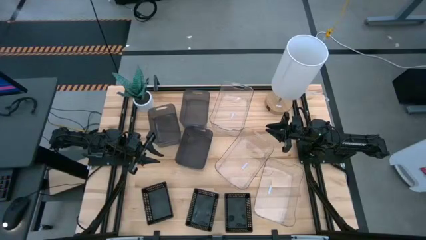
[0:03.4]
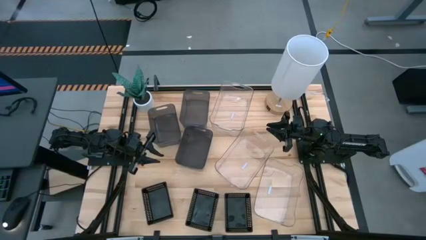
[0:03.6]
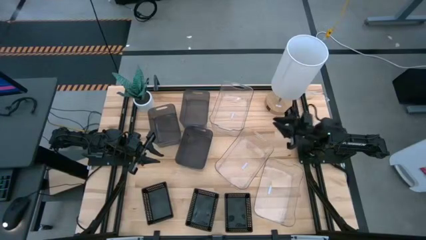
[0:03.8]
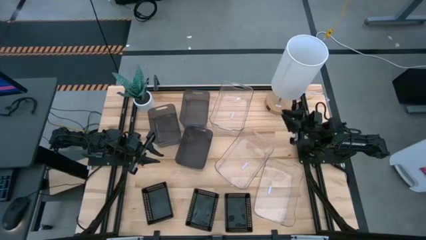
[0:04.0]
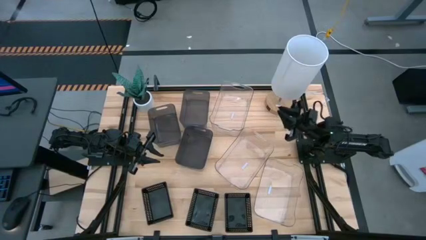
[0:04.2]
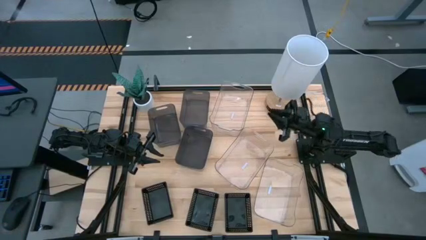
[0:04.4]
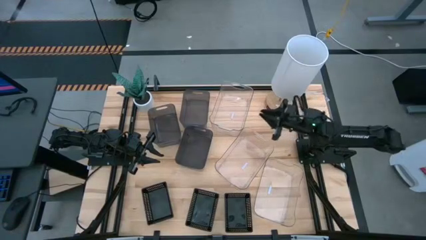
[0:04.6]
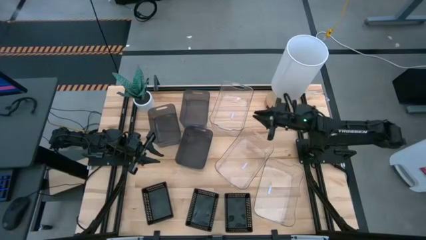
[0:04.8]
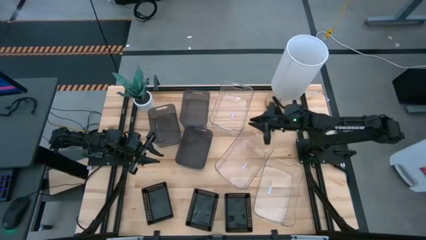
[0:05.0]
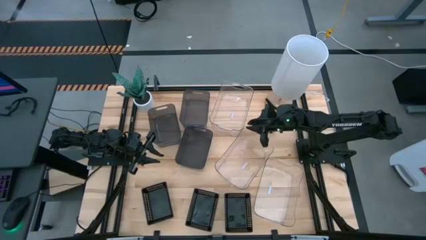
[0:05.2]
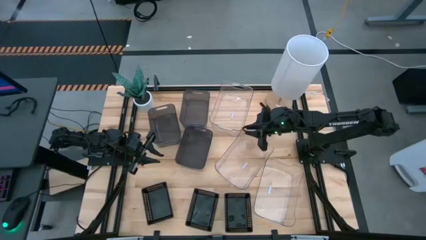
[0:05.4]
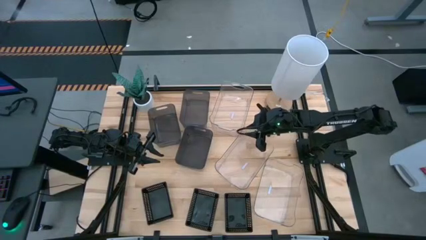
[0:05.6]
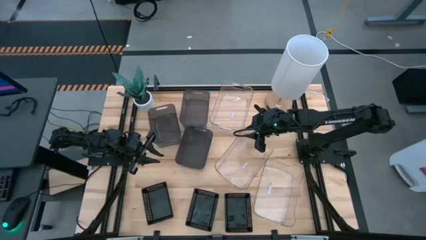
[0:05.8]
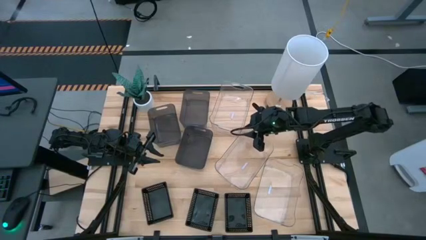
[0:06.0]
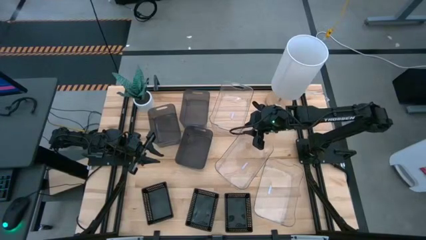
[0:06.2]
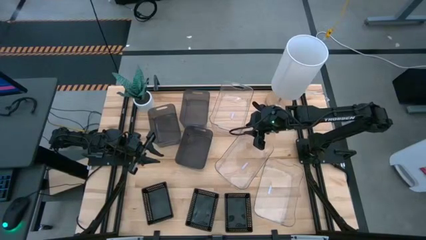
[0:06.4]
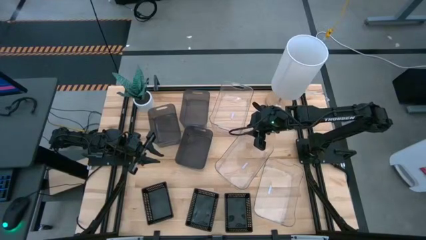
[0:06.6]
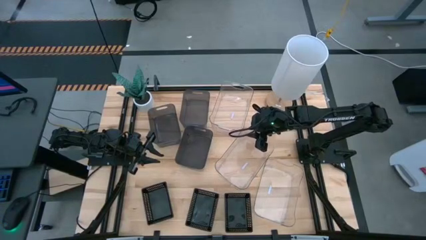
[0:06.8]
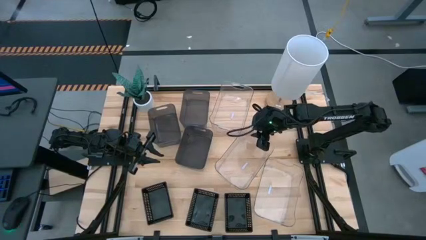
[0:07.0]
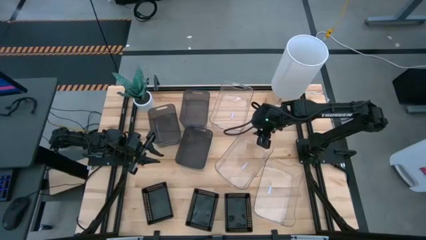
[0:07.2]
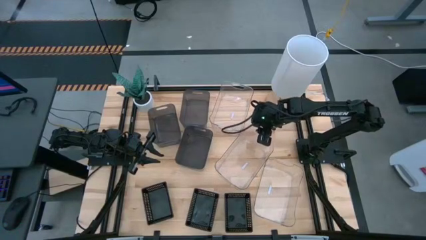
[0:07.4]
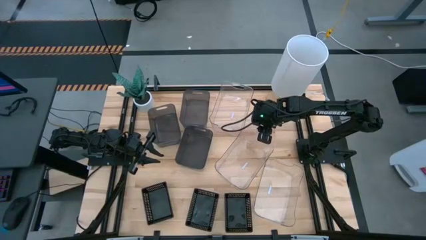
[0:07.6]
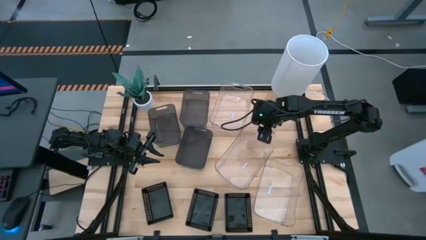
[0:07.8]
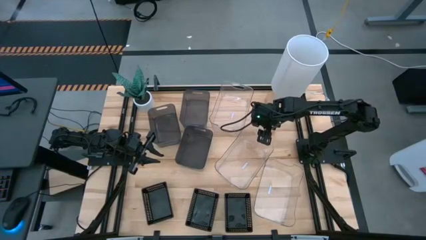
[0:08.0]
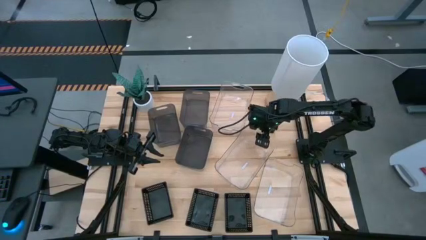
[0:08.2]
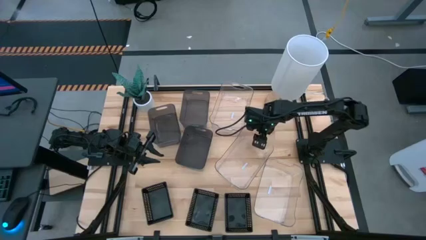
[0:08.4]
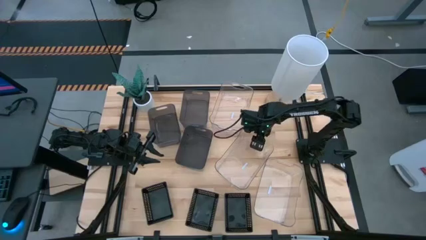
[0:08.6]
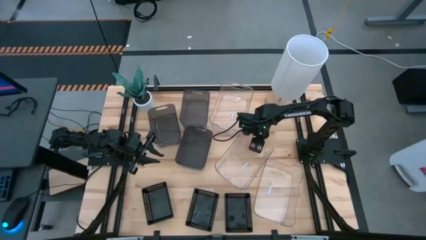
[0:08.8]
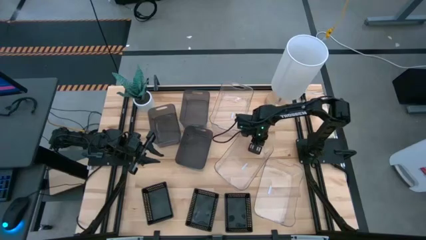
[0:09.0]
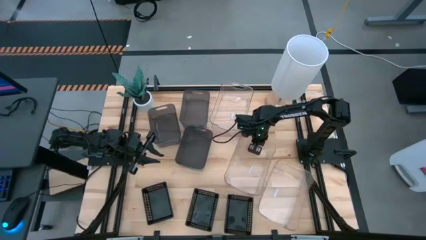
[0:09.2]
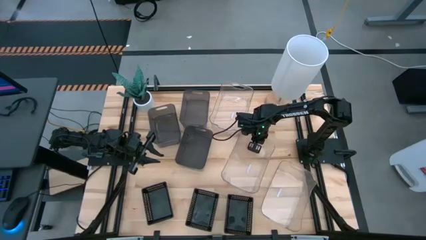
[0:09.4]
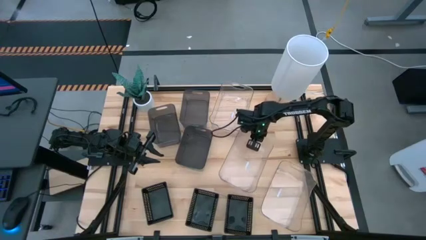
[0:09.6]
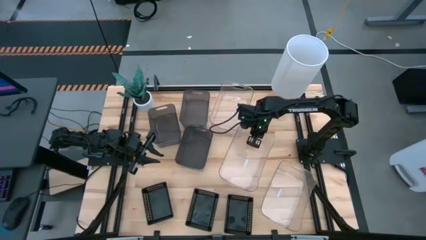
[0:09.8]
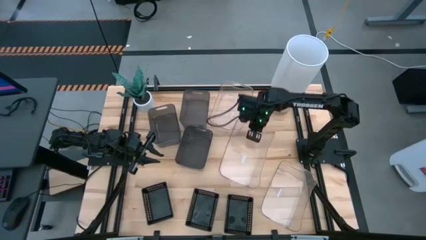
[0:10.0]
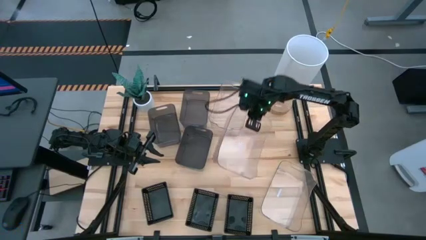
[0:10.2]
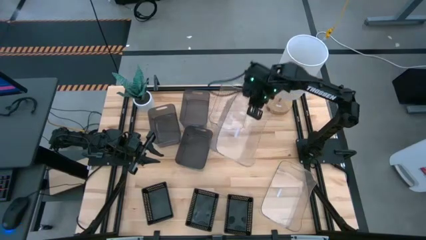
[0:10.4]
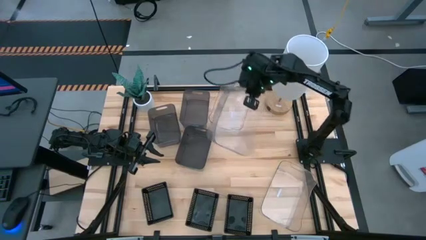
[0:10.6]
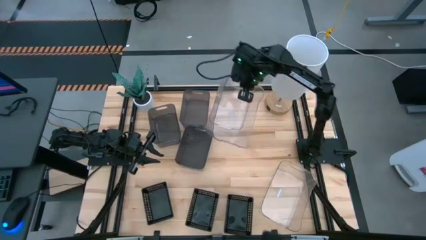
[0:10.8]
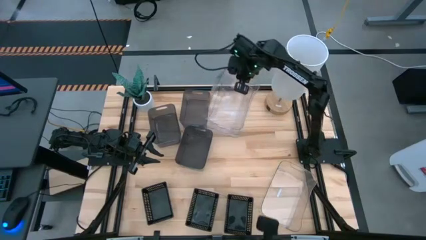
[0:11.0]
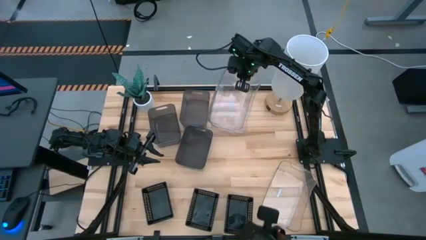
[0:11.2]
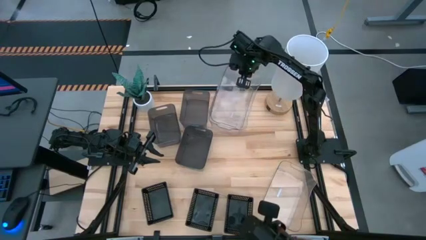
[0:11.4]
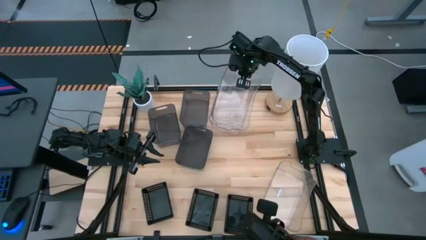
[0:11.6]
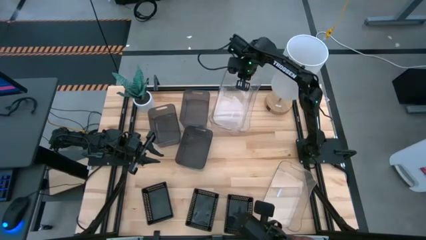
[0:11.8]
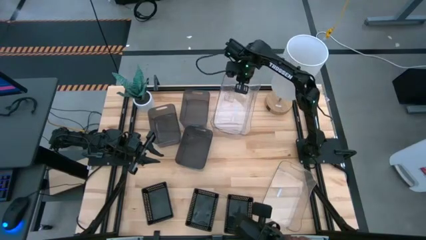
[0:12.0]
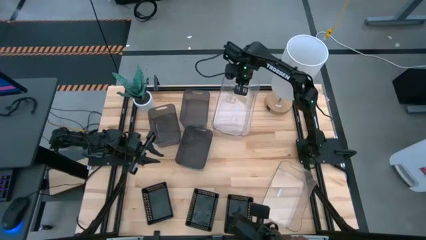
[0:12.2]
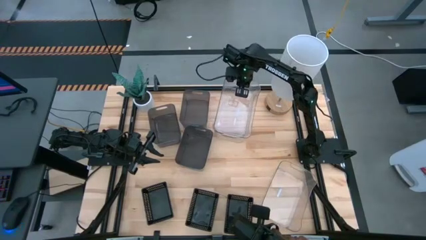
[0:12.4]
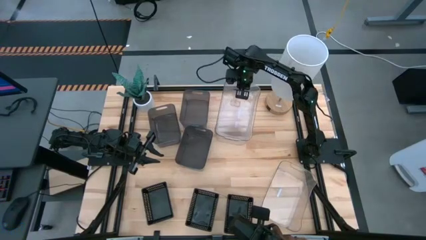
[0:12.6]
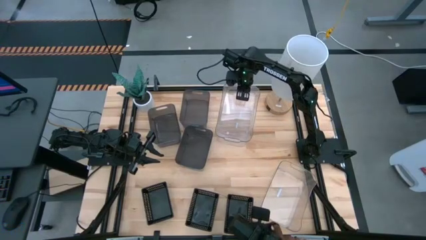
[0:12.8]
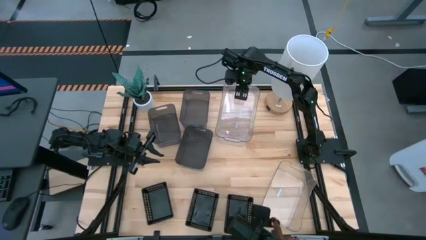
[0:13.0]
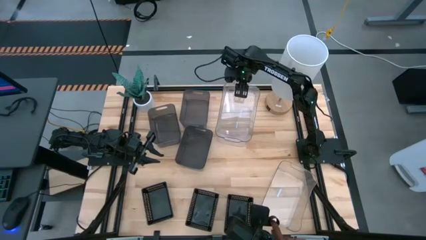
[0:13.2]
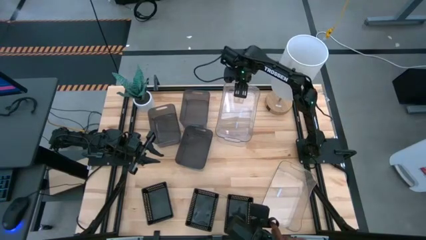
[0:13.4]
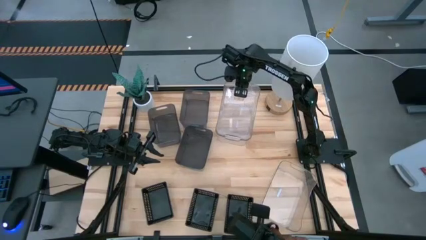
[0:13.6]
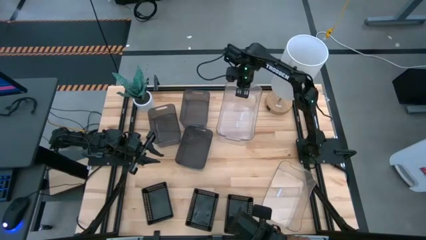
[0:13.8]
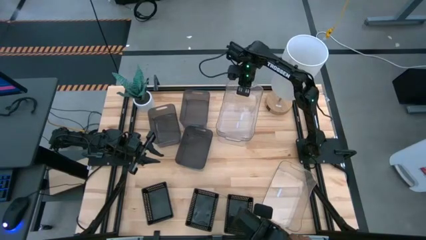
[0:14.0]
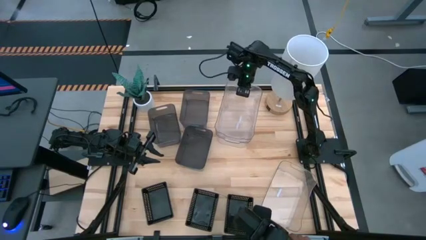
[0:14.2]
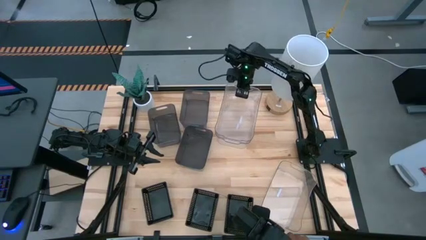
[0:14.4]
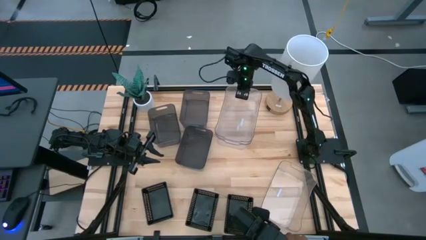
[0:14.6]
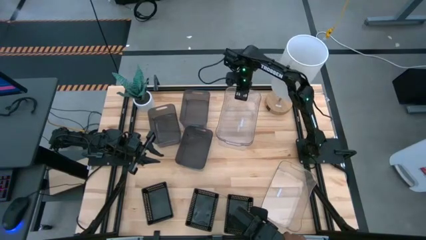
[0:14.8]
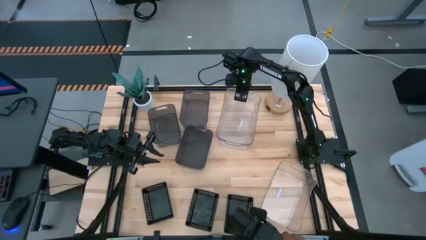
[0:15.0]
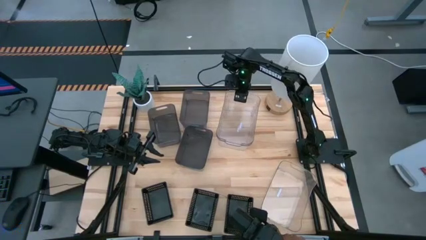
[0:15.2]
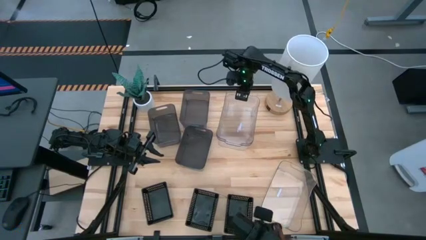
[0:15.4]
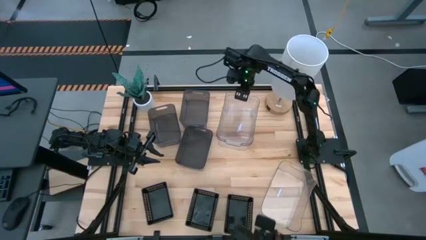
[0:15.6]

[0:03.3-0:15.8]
Stack the middle transparent bin on the top transparent bin
